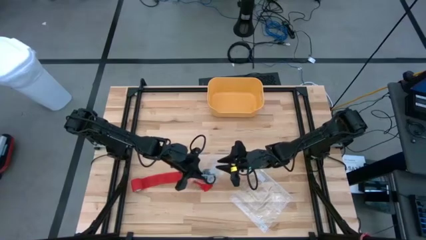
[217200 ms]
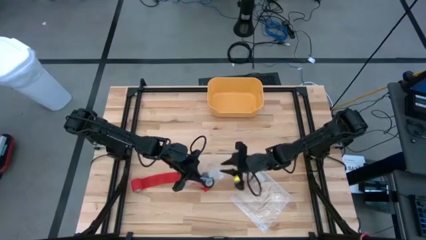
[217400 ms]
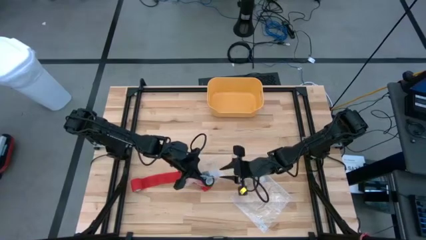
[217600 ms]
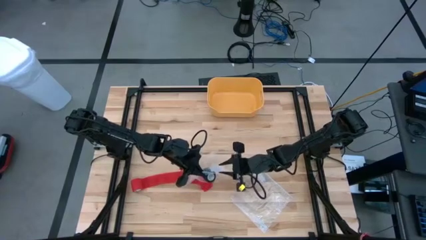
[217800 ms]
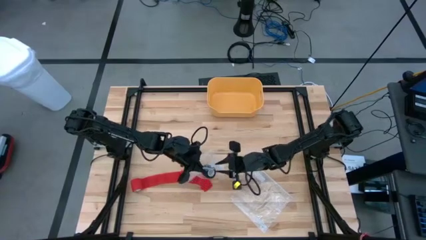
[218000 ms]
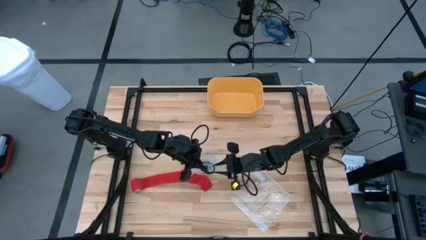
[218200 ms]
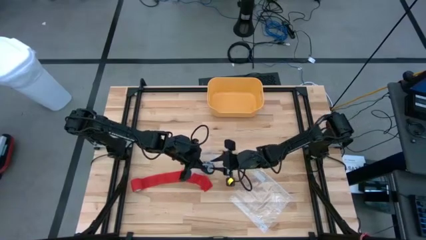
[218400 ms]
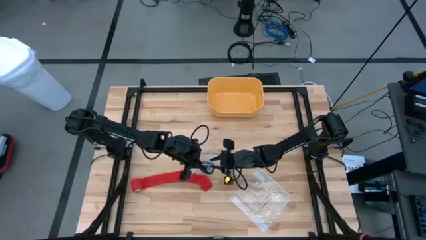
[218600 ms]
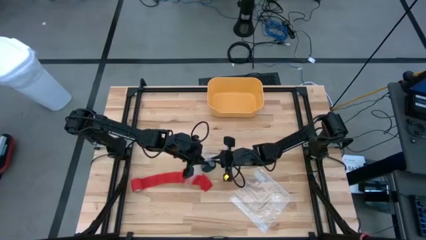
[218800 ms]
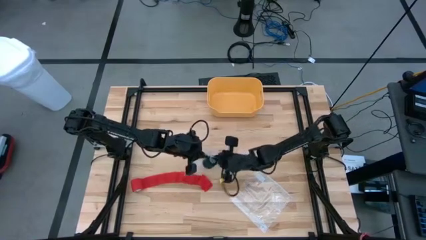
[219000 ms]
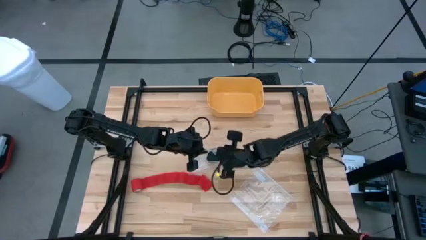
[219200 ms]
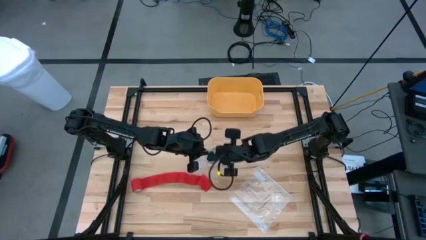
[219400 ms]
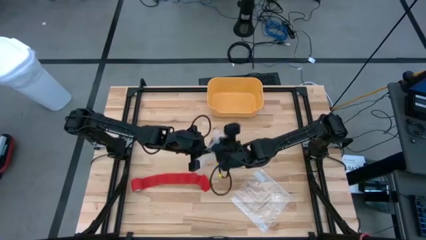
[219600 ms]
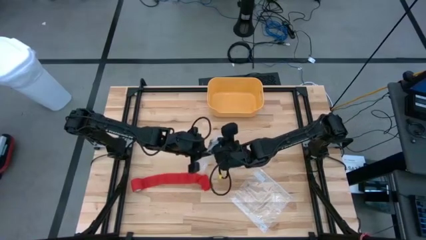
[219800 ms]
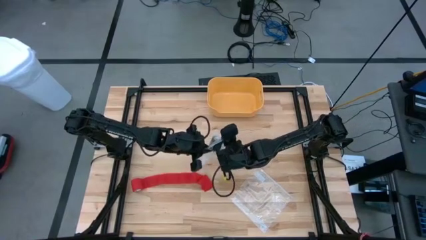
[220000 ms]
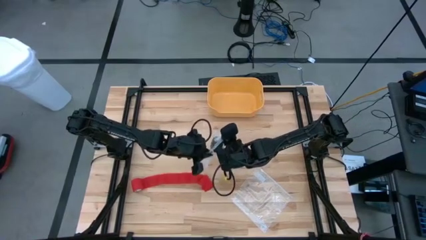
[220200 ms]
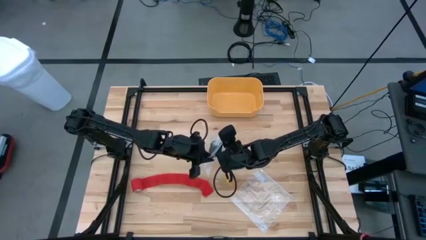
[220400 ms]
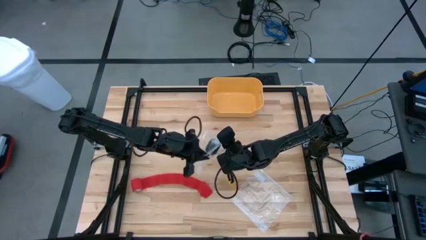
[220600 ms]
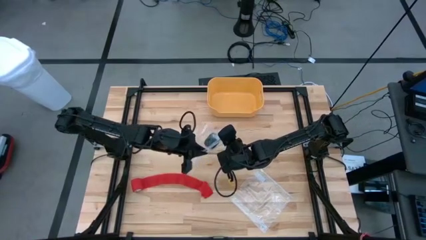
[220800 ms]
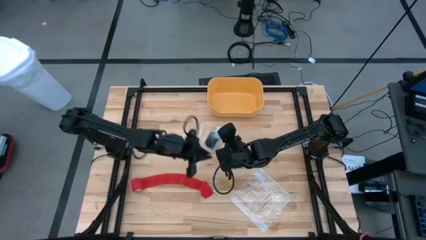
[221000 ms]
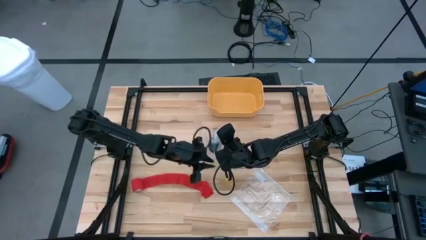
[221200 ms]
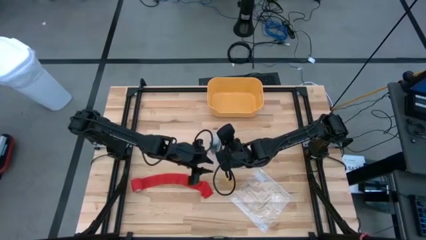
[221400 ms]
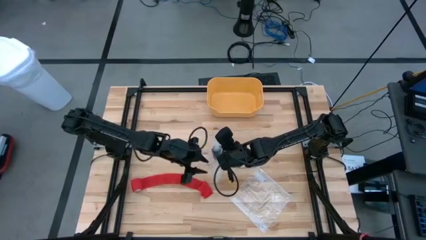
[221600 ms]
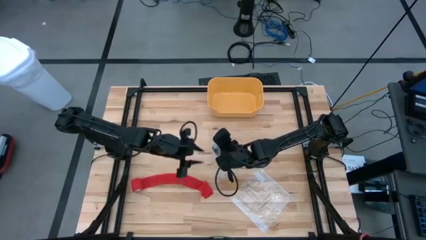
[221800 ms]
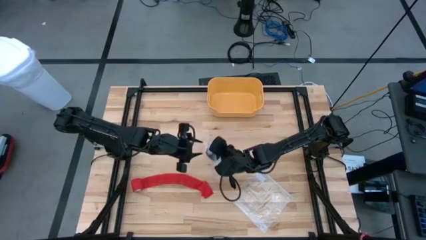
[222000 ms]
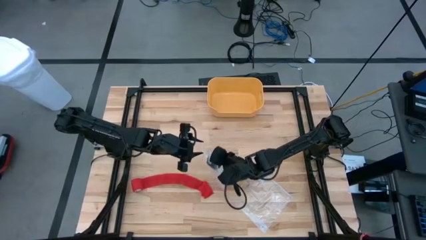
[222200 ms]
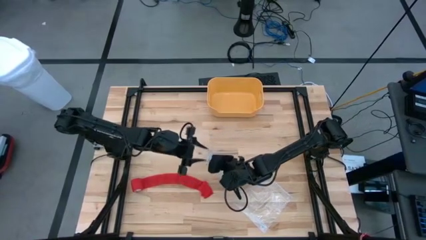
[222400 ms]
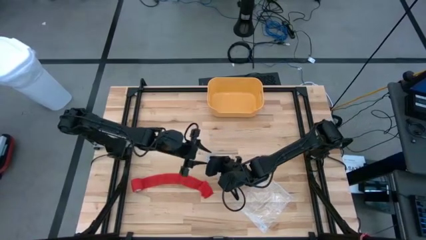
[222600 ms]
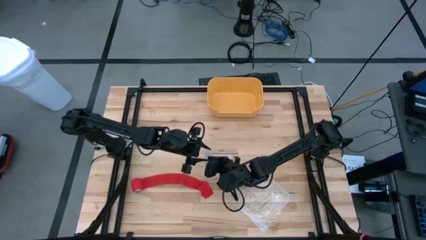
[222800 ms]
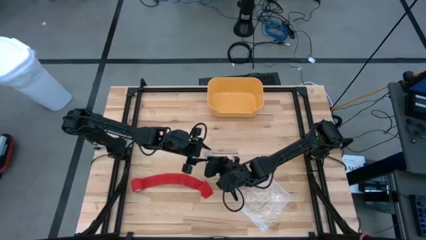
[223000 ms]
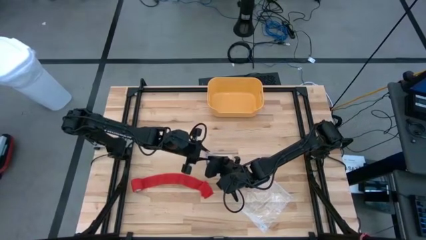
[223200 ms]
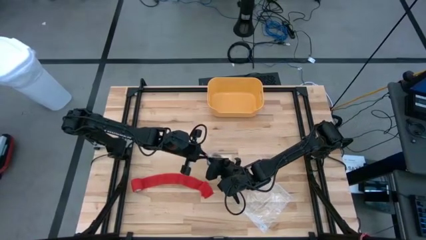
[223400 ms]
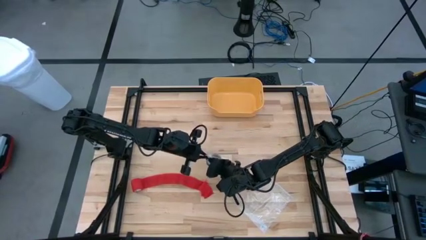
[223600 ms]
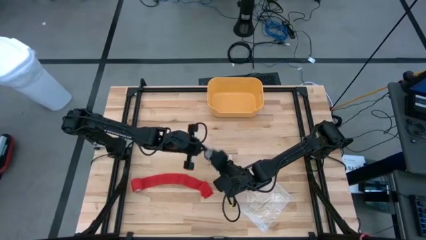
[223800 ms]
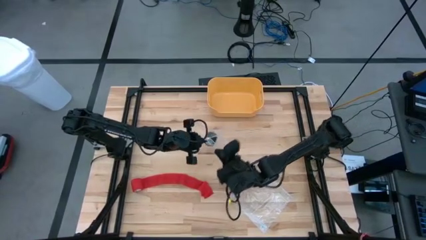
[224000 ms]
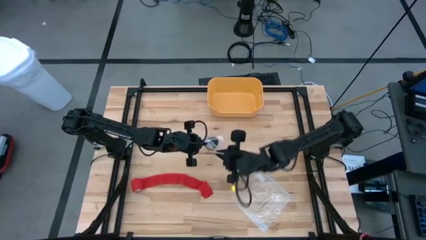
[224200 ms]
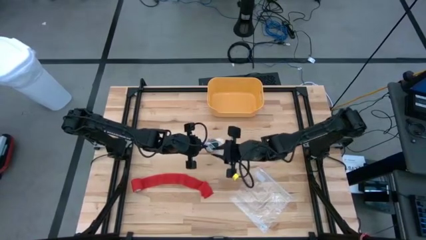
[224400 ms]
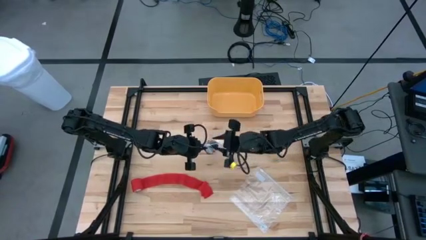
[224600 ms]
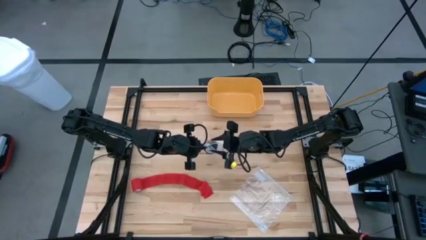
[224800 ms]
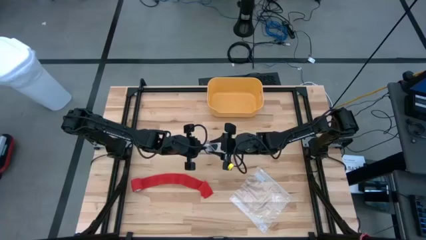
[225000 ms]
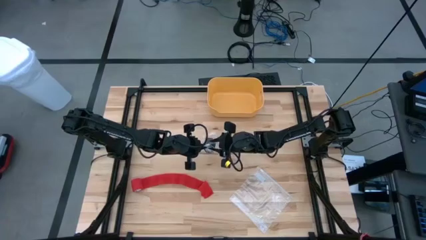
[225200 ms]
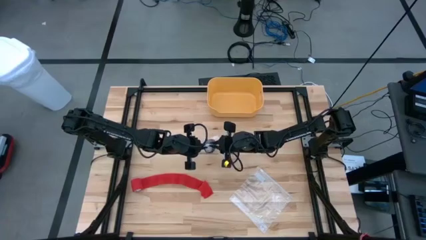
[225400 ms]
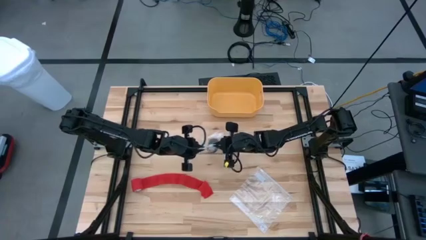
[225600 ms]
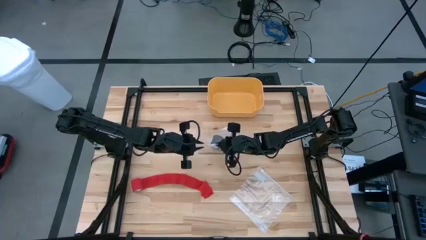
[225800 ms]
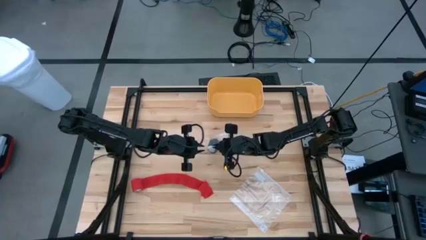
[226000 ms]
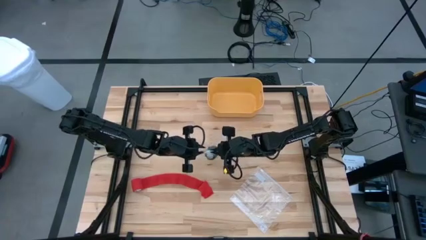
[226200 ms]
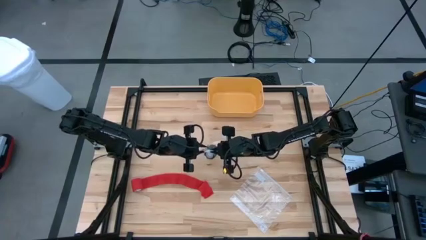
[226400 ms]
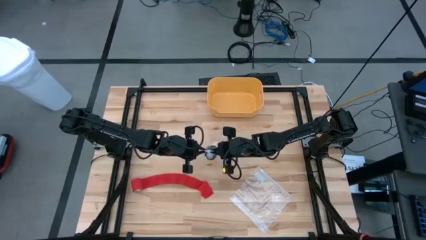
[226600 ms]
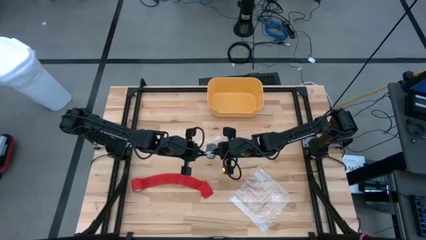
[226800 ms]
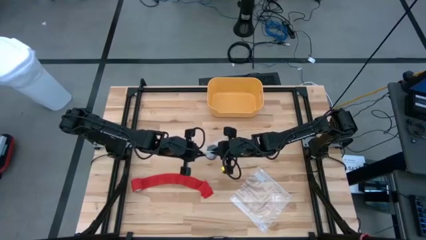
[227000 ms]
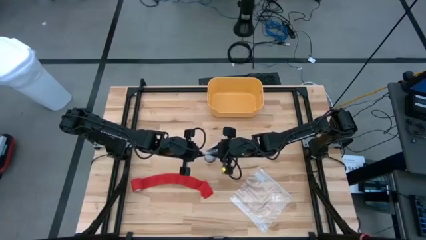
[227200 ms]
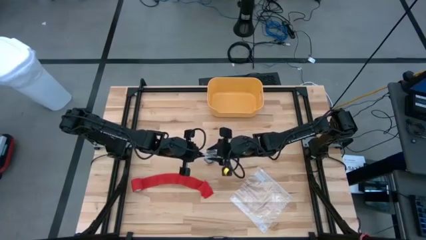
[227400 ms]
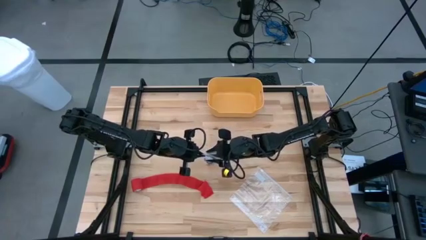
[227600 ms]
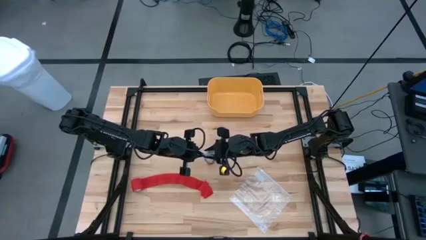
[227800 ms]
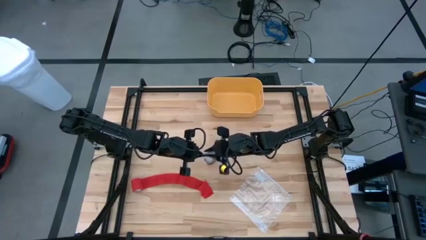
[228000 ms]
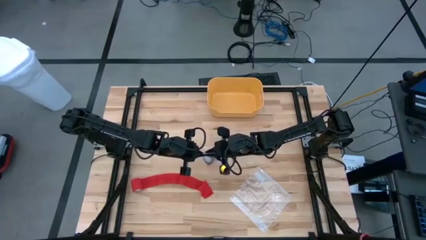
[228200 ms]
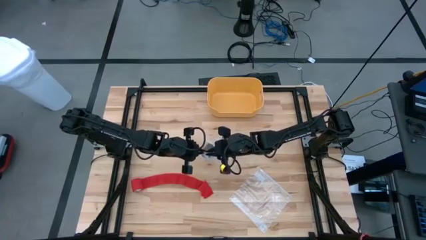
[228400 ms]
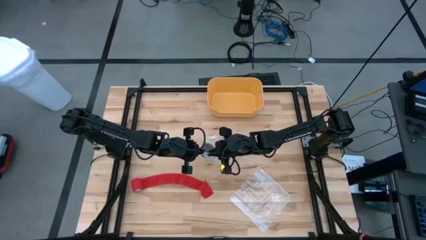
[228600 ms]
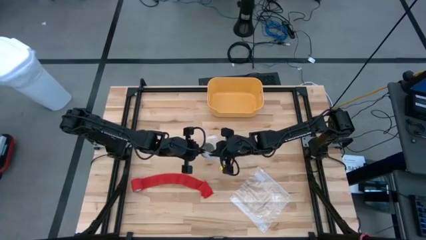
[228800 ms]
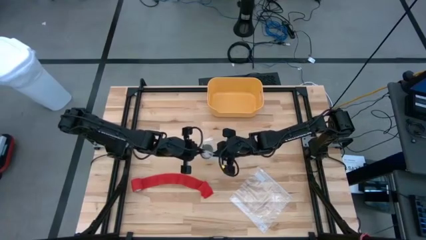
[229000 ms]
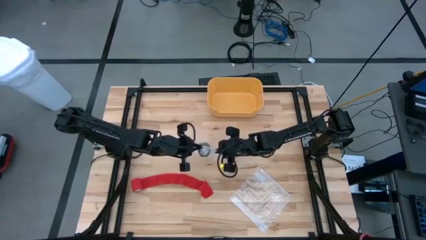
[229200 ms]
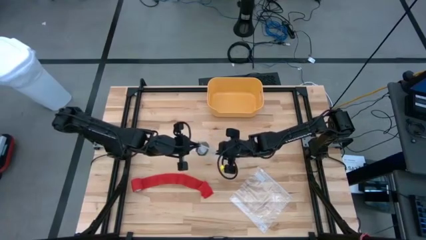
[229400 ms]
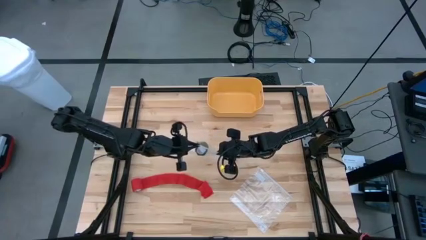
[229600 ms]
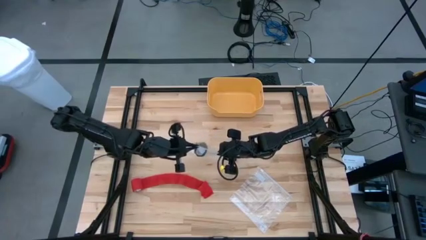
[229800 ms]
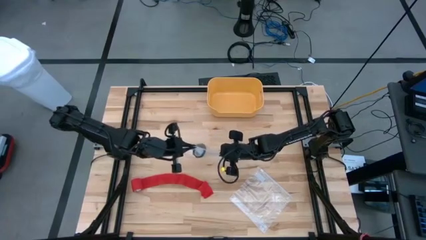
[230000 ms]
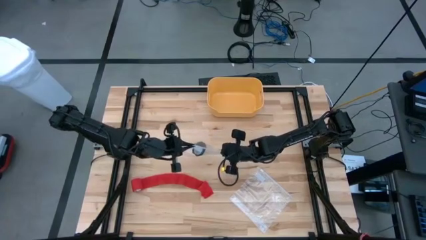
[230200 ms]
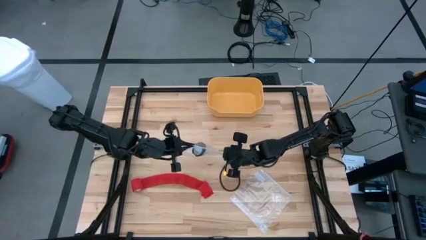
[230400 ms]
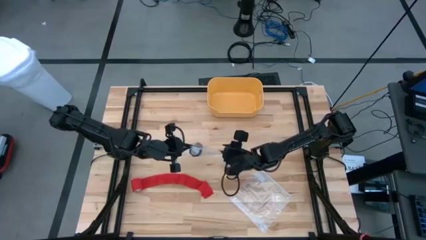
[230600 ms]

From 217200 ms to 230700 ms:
Task: Roll bandage
Close the transparent zip bag

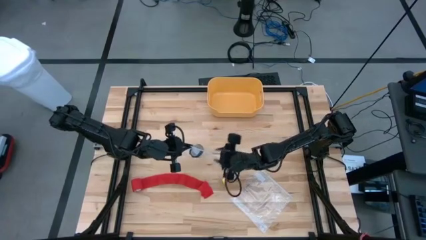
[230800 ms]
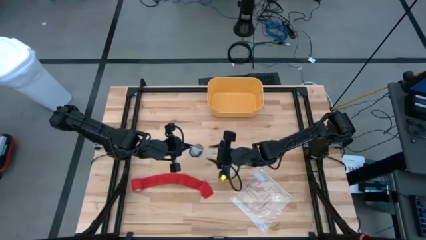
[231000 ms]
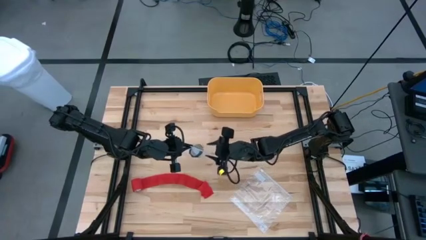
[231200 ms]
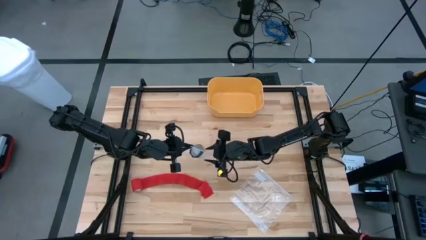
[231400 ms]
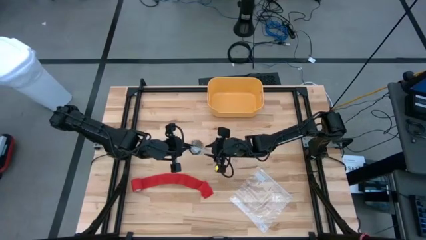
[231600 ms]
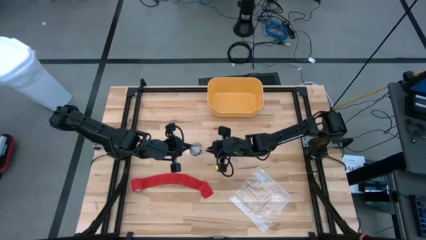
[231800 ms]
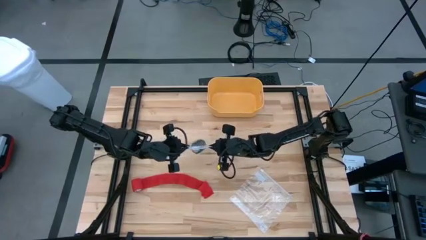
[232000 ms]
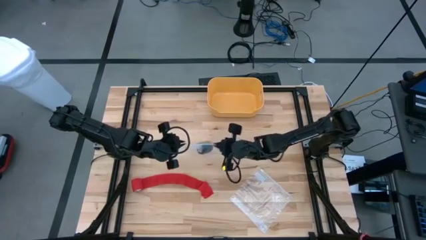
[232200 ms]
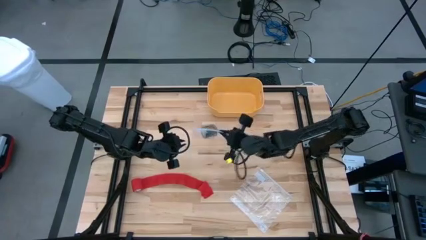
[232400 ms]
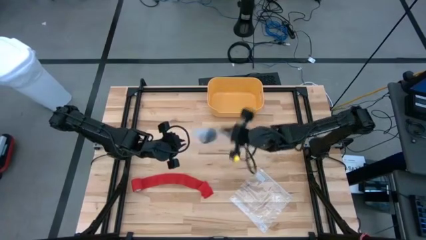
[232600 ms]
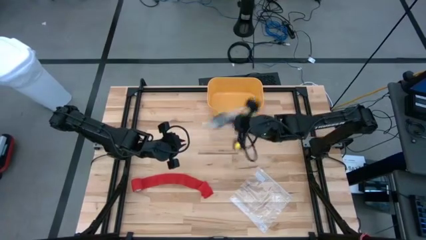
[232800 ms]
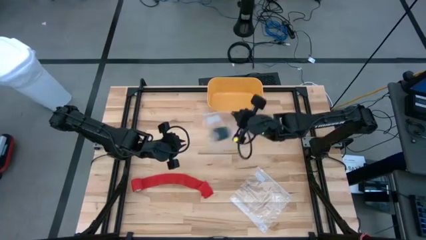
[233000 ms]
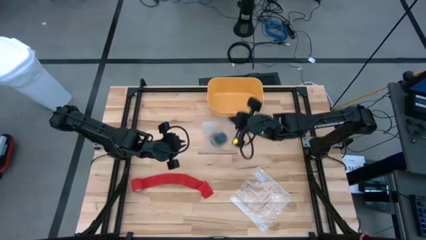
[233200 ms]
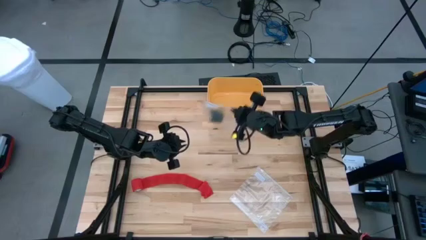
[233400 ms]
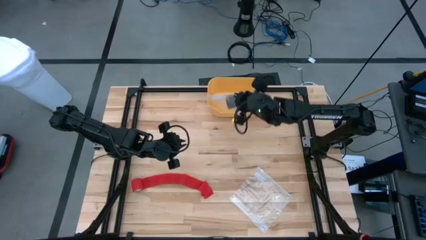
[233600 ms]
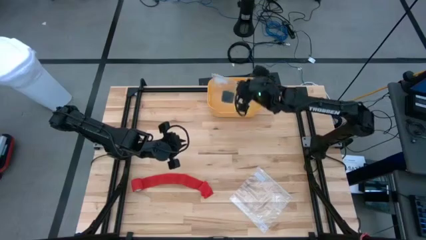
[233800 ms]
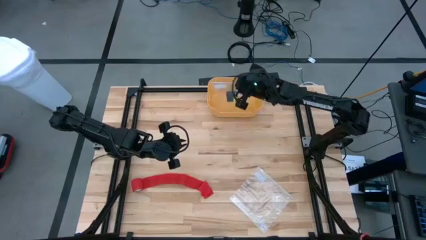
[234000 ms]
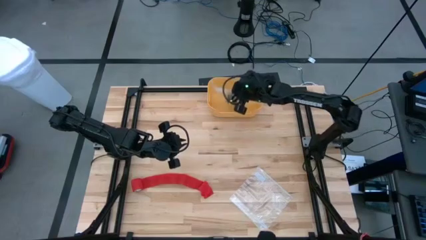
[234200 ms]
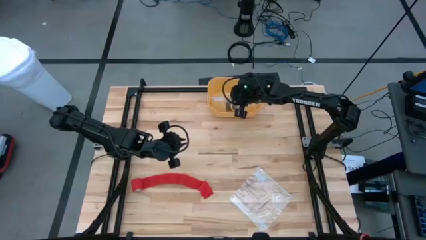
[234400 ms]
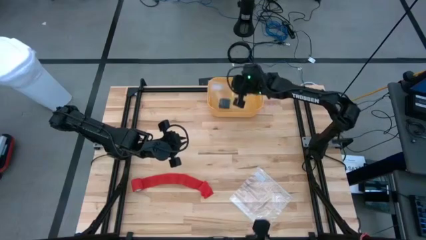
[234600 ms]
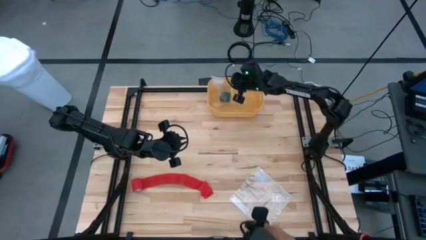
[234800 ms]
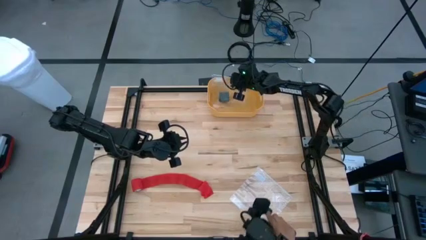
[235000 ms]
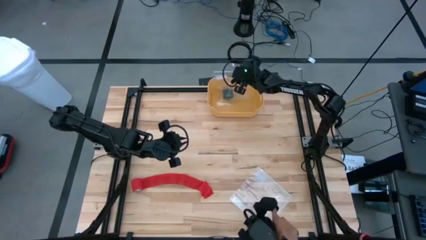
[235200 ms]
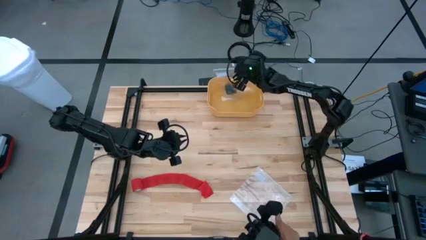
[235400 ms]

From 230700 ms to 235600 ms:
Put the transparent zip bag into the yellow bin
